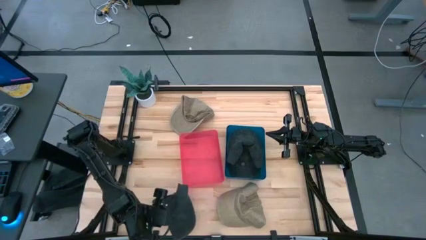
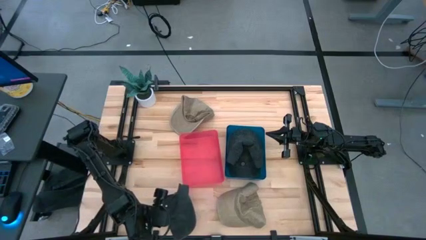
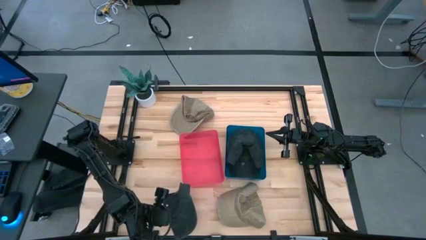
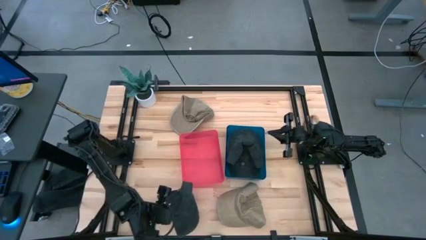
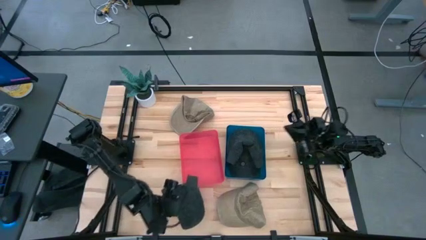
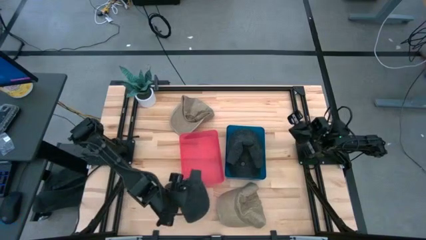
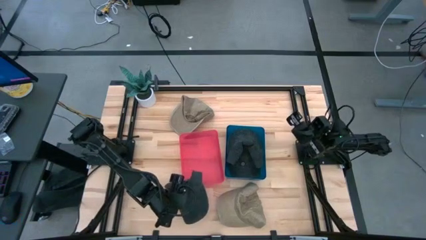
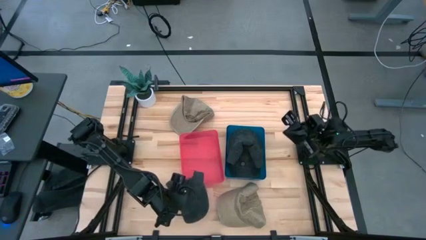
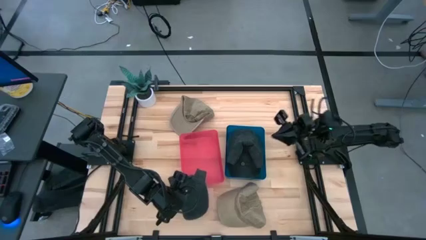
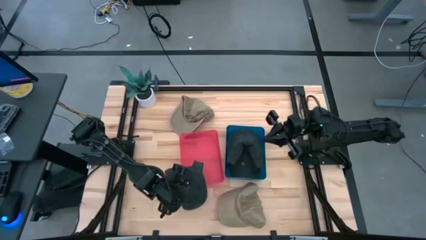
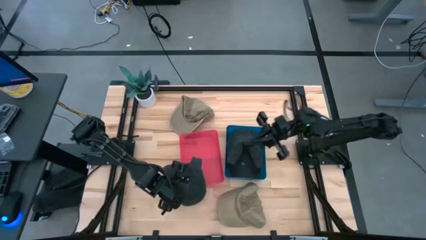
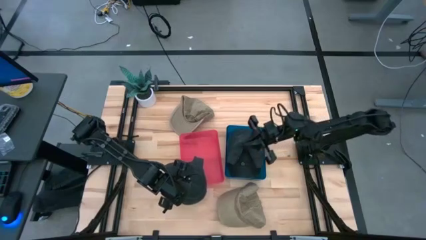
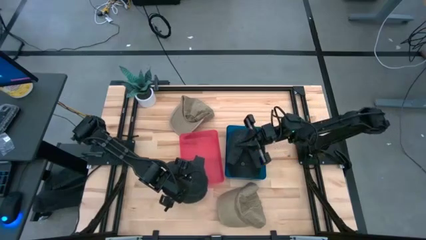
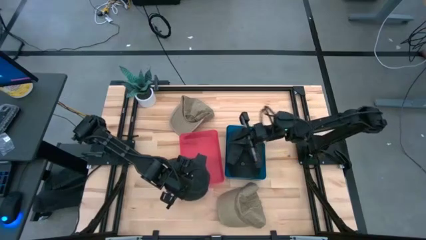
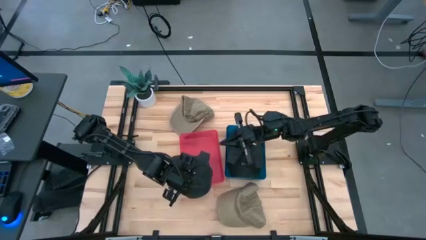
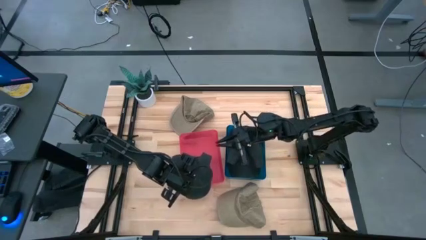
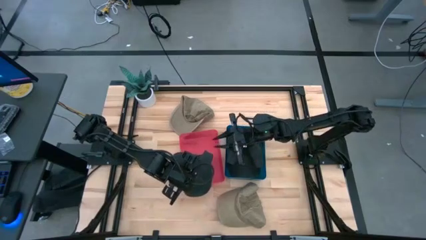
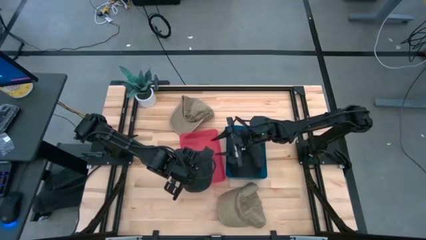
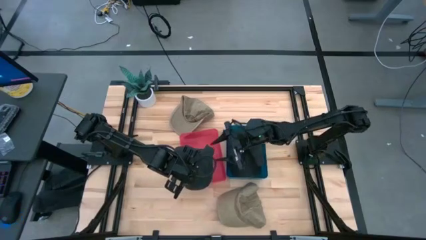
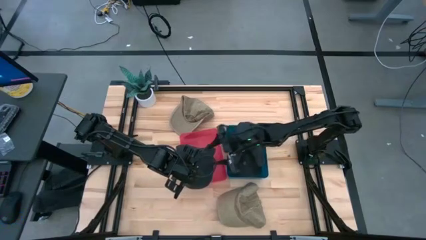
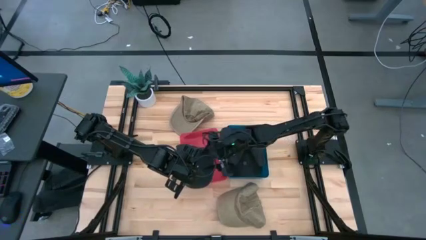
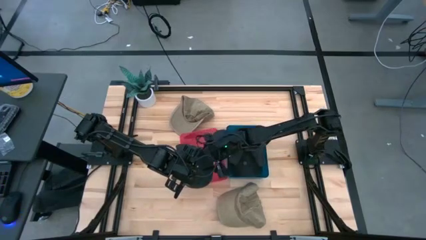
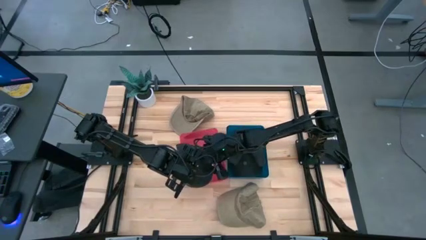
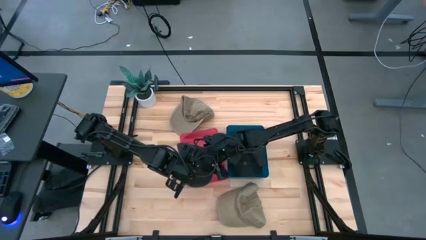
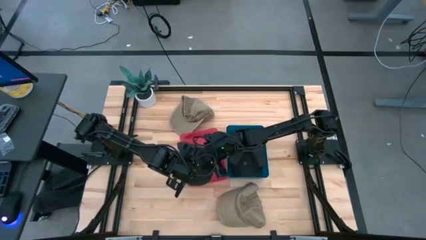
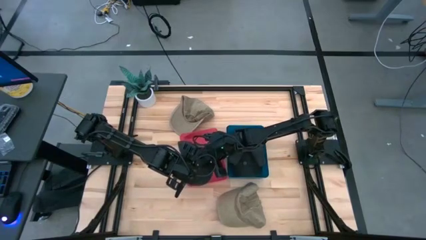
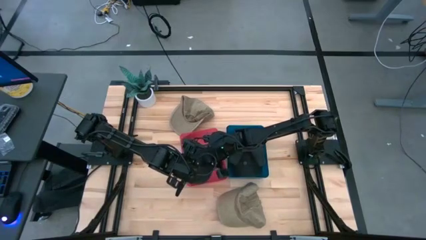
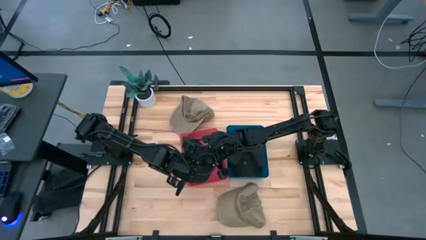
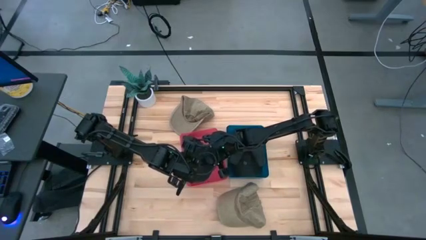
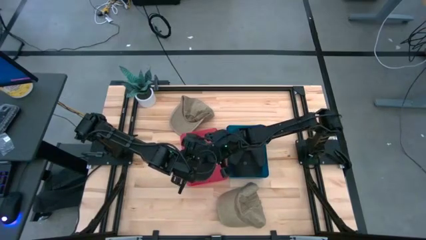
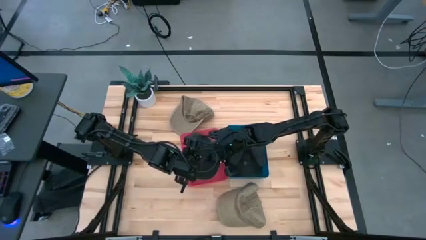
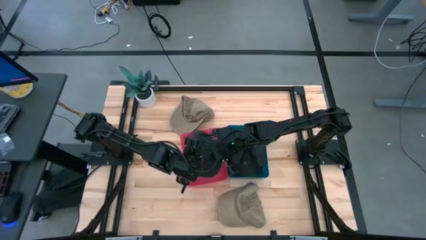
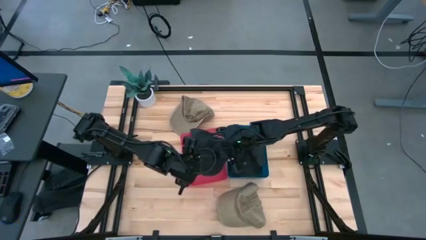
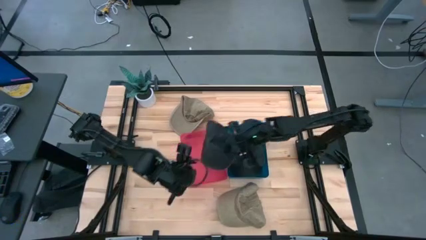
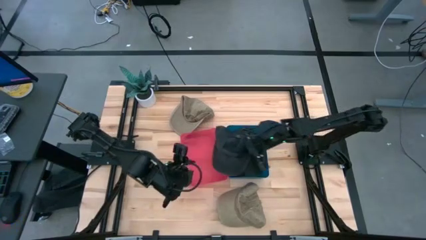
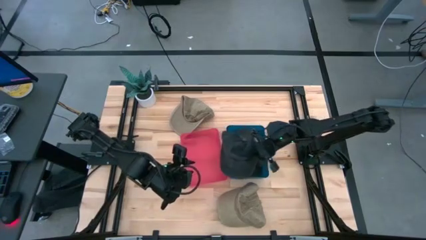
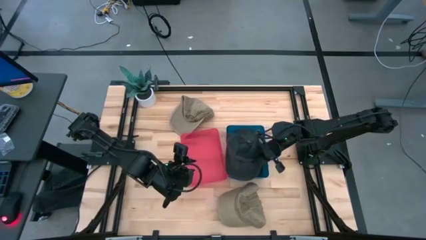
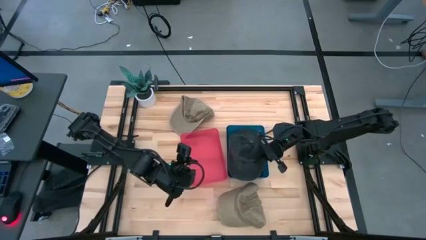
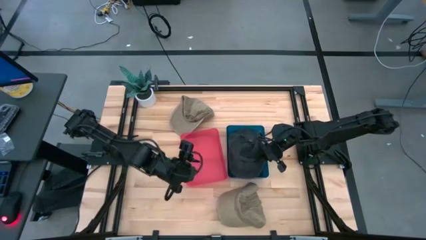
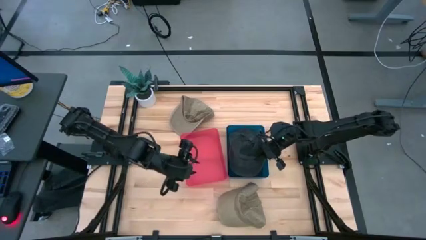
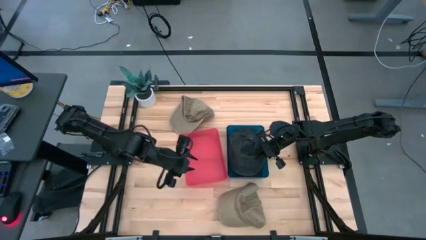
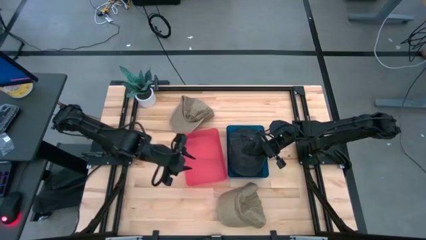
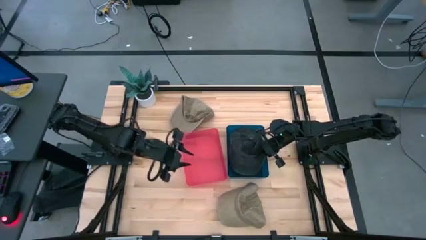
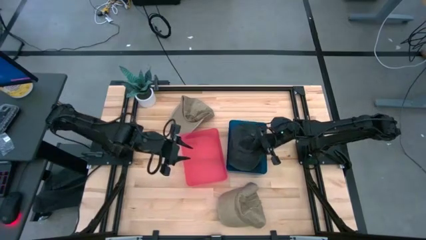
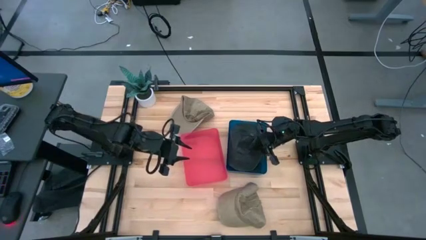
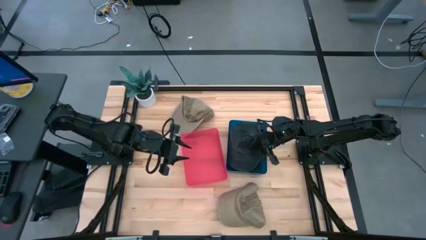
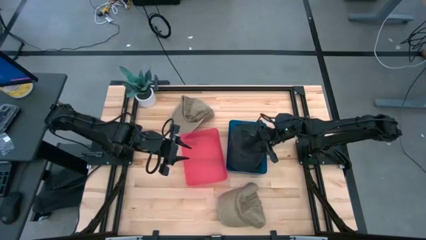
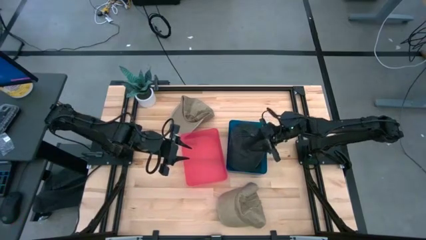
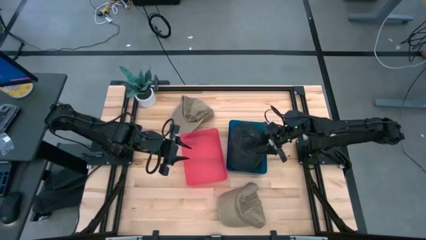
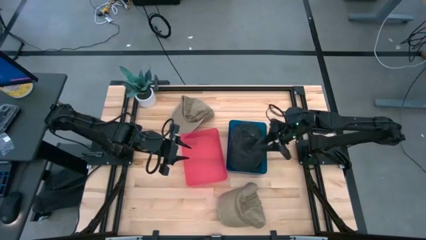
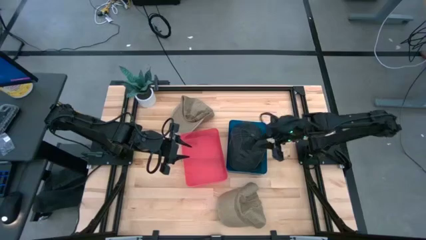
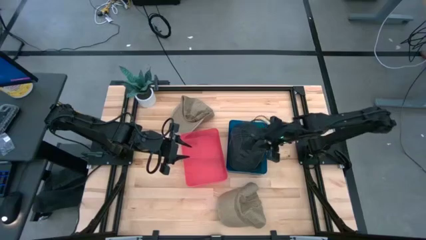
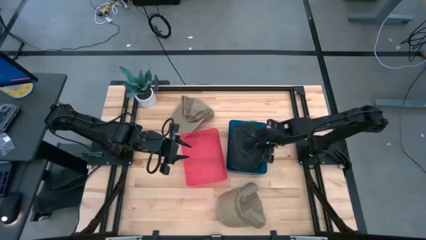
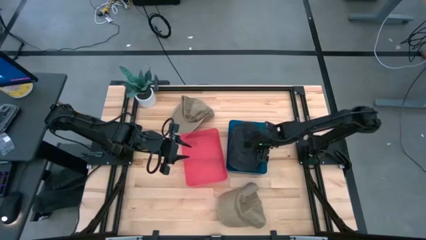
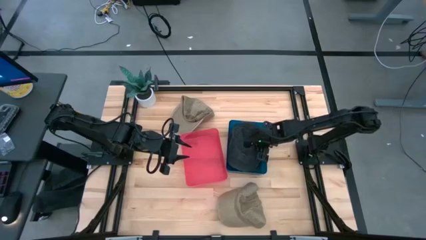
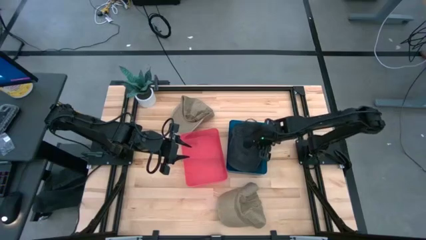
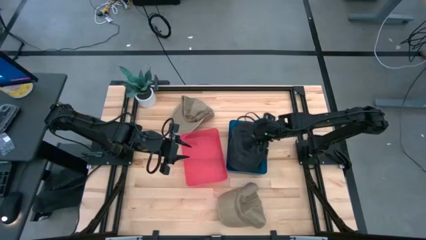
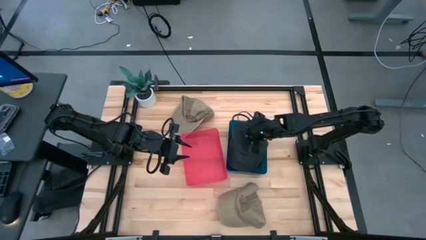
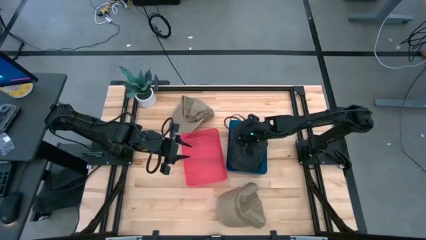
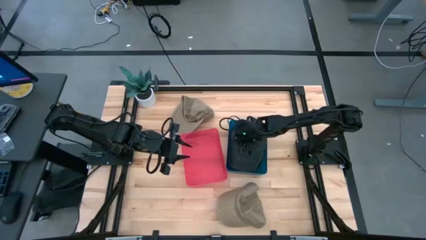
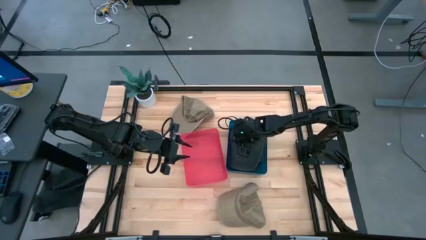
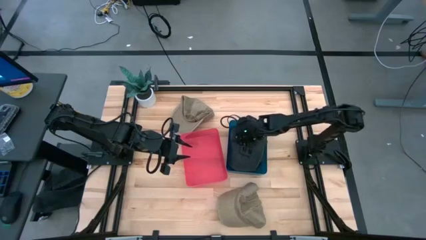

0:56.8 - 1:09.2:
Task: Pick & Place hat
Put the black cap into the blue bin
